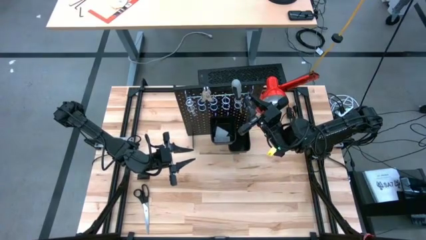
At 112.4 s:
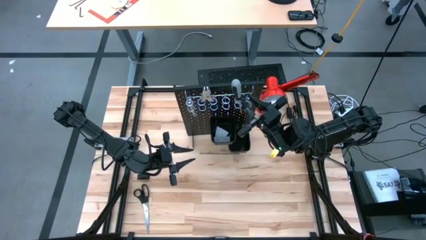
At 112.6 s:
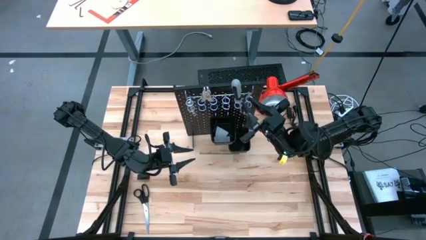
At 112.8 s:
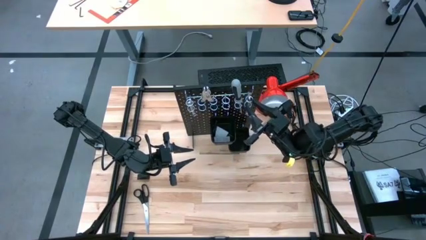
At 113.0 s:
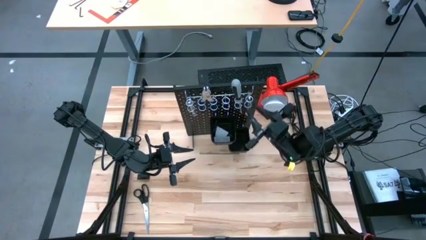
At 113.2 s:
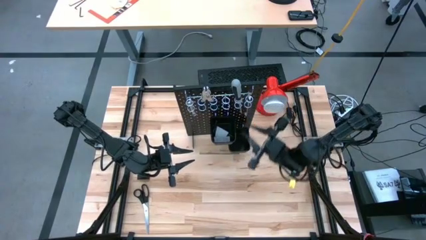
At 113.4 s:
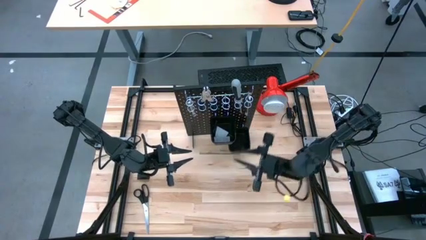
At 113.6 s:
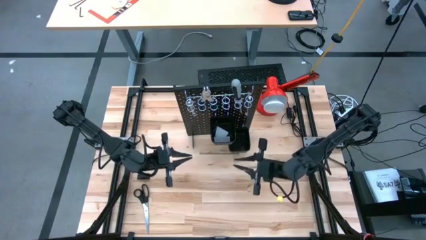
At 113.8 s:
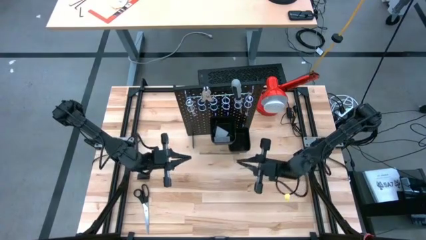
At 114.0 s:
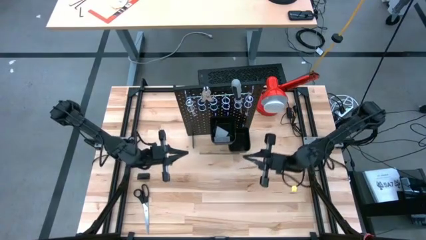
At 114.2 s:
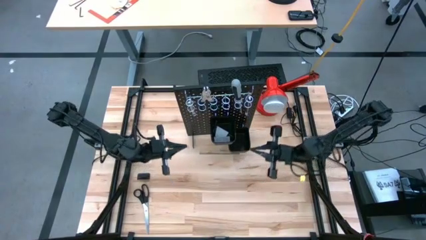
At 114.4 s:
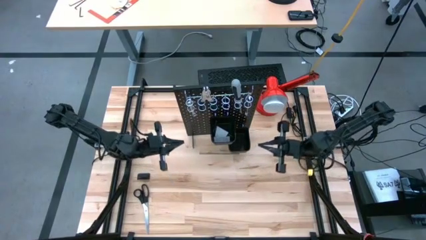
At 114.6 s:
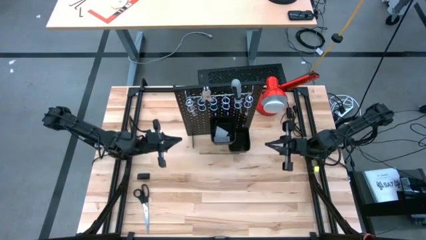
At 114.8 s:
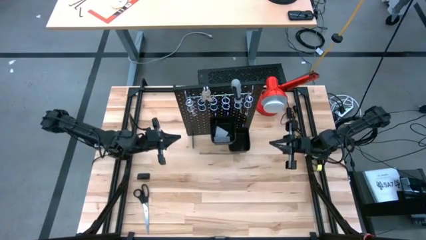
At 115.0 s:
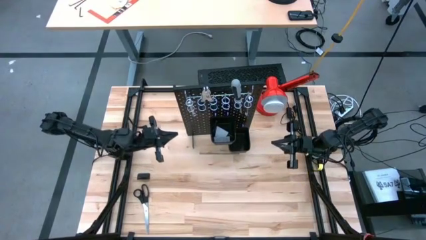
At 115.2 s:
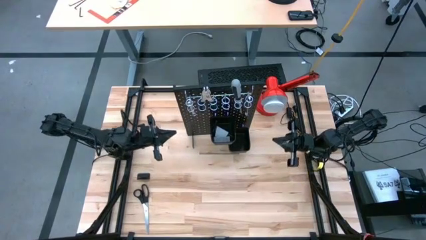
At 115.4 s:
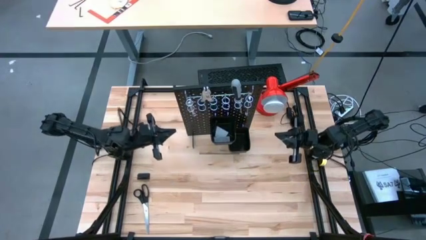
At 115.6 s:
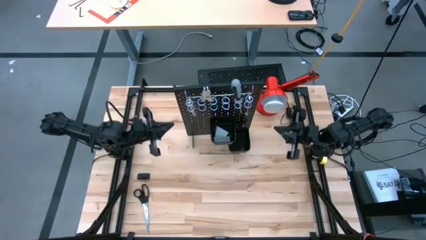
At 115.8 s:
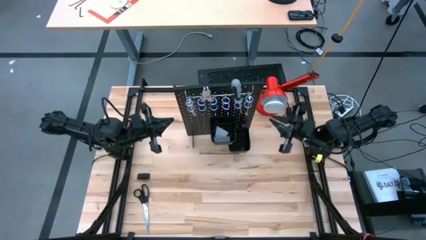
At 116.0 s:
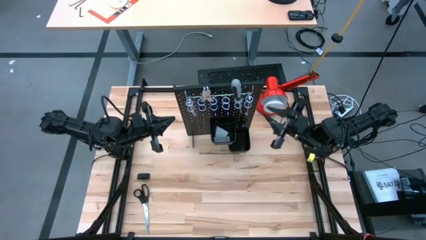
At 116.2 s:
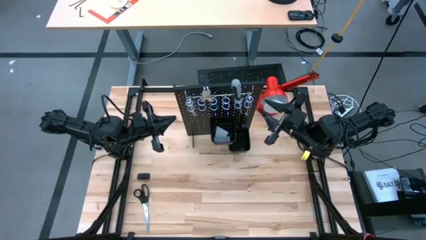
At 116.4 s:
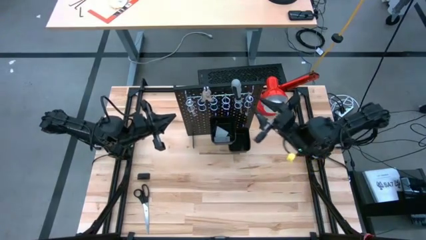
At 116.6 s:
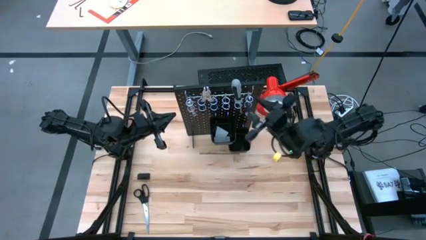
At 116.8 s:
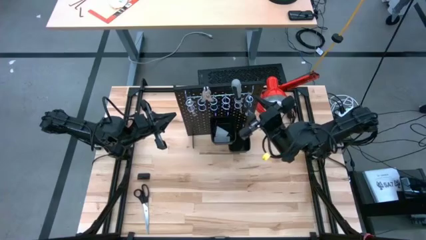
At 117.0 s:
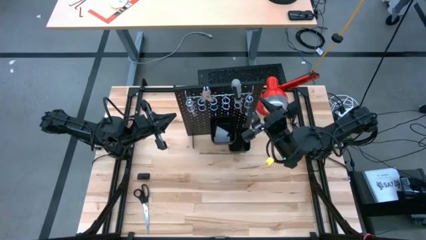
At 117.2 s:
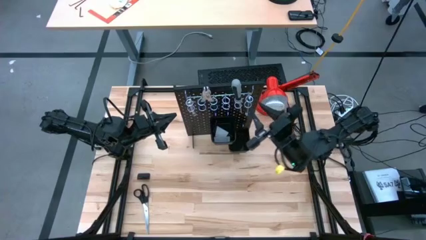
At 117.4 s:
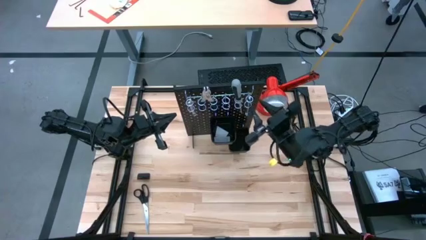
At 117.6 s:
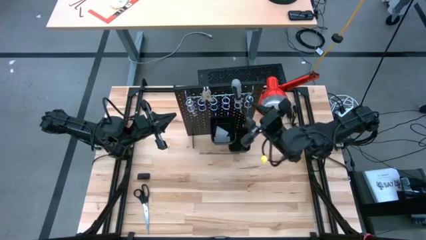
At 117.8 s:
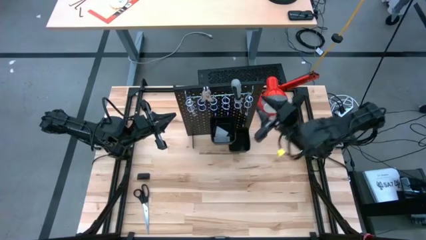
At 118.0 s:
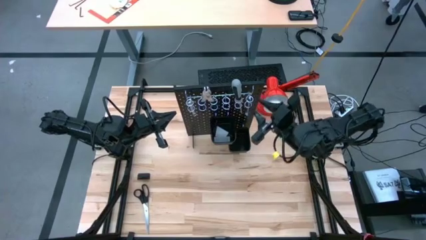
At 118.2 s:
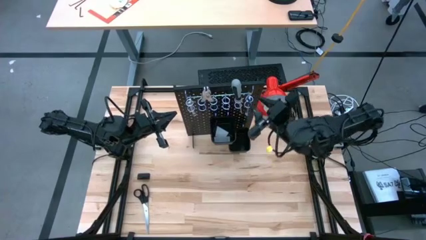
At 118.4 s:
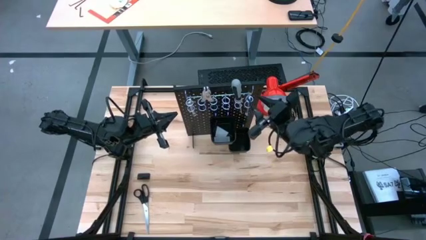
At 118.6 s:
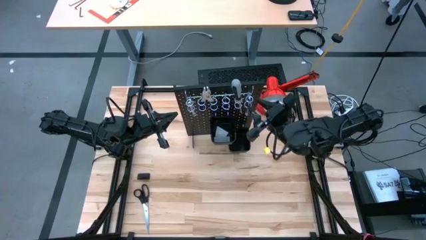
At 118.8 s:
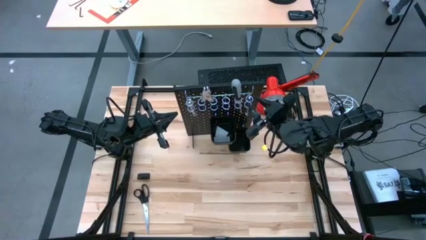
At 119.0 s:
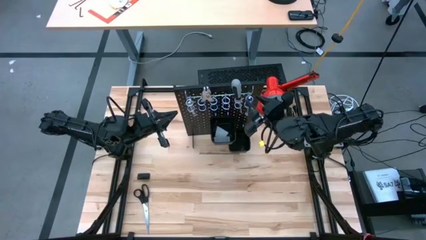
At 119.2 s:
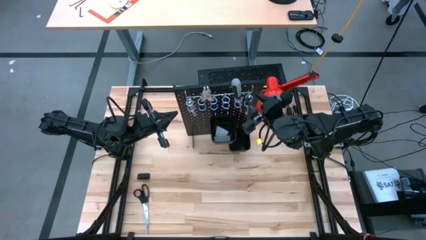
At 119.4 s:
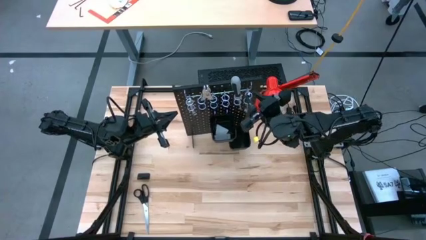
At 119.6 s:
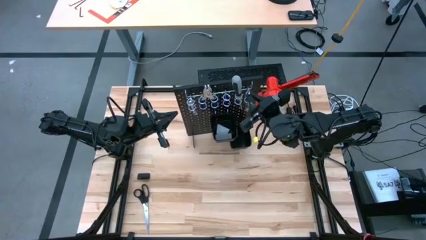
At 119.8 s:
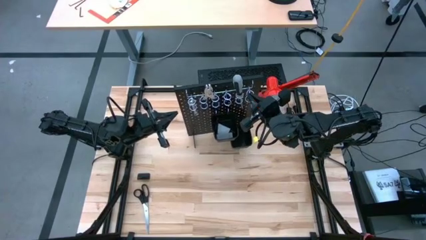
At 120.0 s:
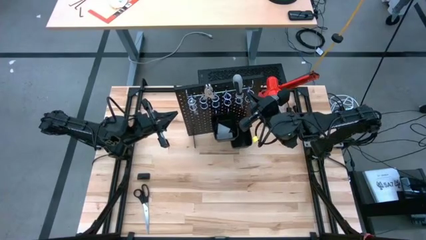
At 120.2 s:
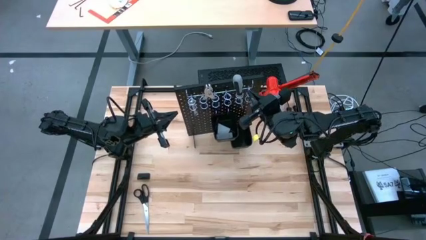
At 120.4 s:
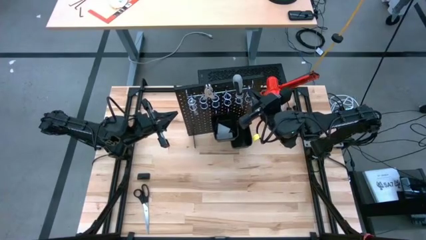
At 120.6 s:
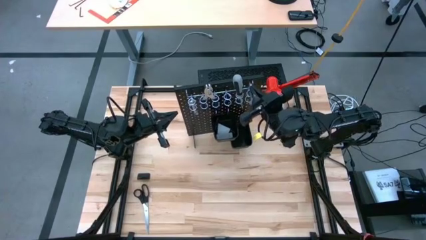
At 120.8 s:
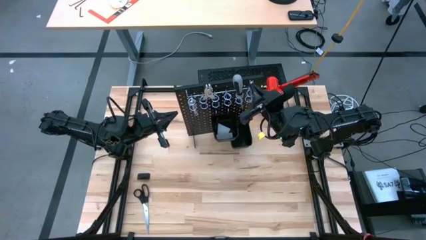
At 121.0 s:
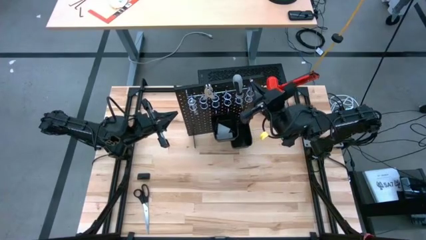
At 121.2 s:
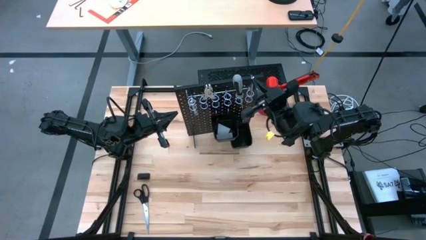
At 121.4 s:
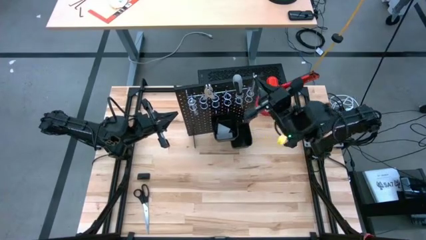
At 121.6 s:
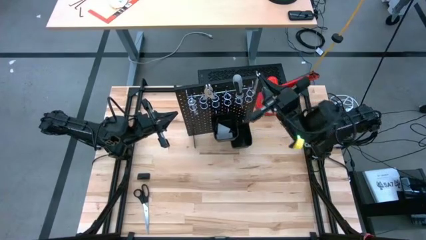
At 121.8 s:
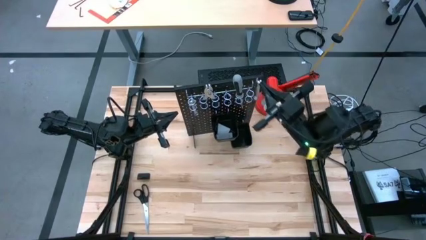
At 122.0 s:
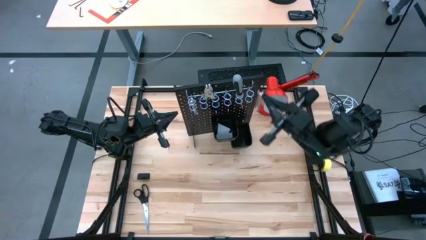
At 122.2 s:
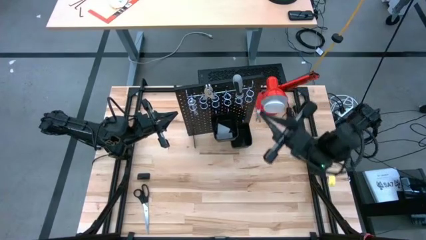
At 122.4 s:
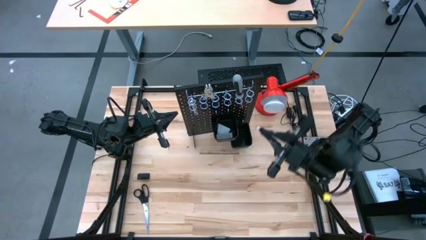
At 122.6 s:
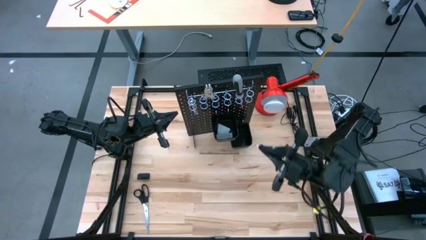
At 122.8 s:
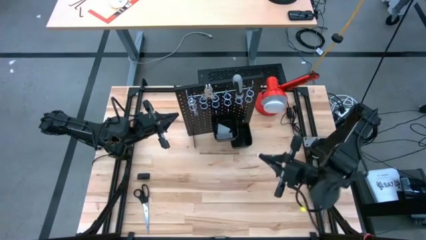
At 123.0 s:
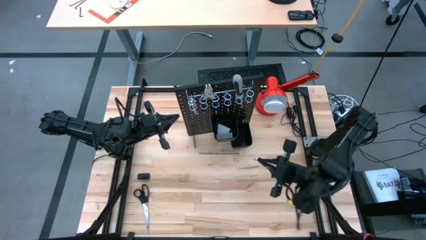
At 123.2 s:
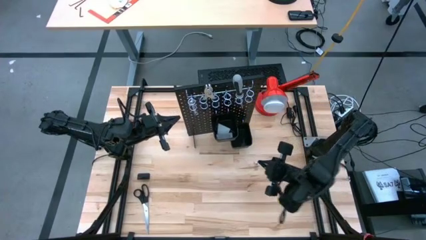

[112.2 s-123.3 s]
Task: Hang tools onto peg board
Unhang the wrench from the pegboard

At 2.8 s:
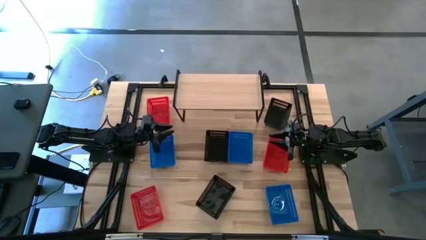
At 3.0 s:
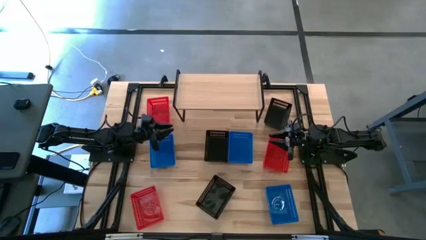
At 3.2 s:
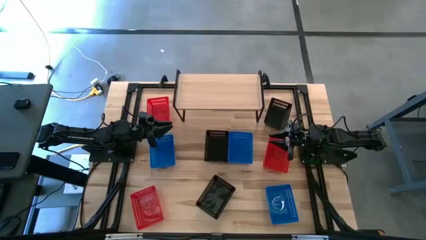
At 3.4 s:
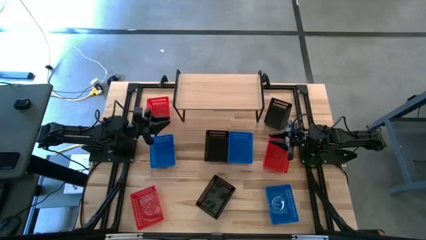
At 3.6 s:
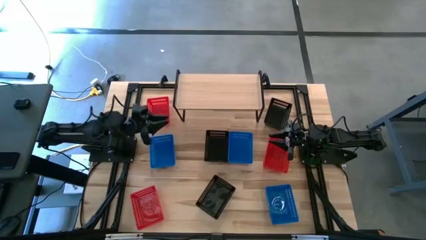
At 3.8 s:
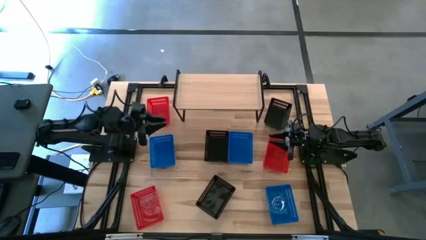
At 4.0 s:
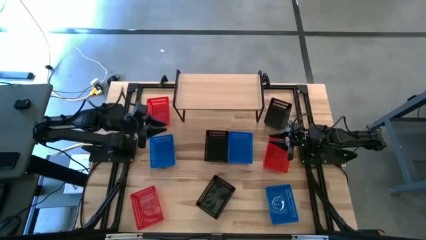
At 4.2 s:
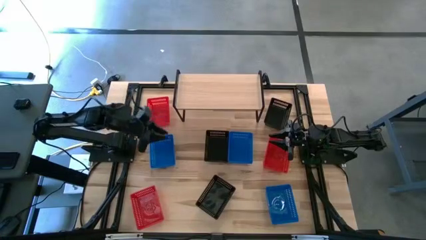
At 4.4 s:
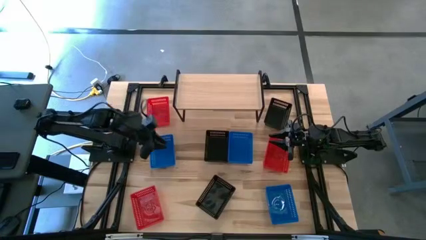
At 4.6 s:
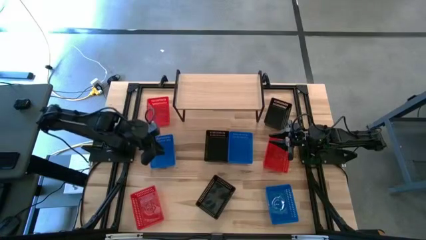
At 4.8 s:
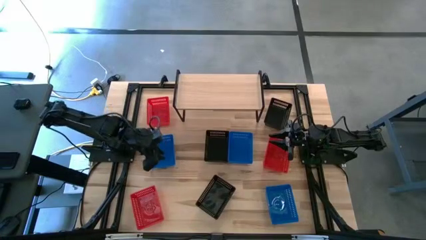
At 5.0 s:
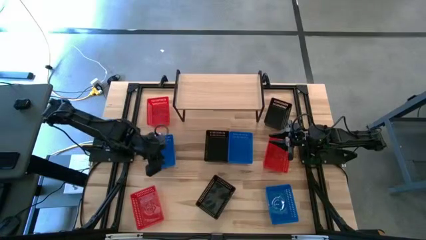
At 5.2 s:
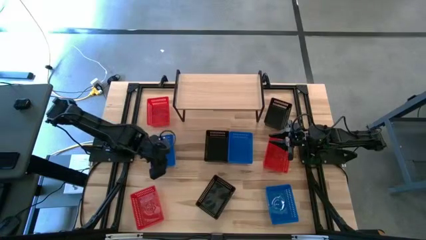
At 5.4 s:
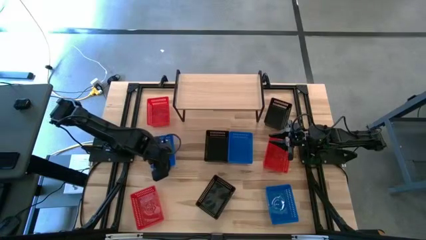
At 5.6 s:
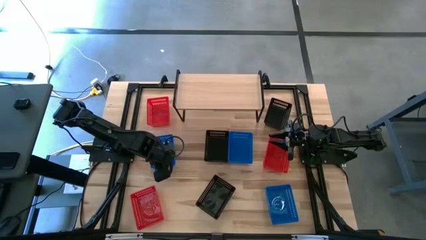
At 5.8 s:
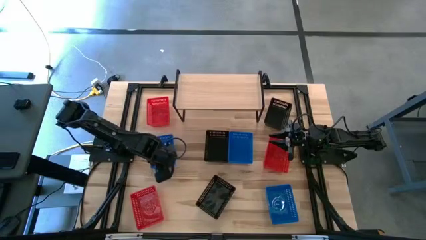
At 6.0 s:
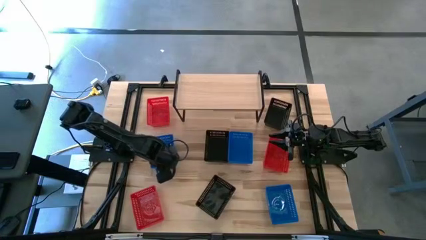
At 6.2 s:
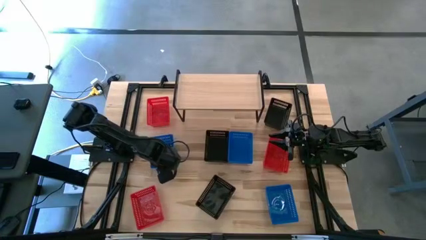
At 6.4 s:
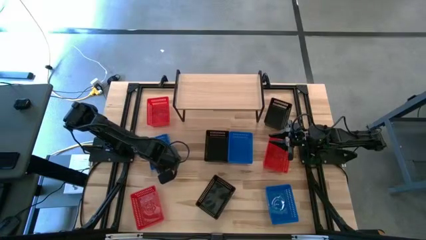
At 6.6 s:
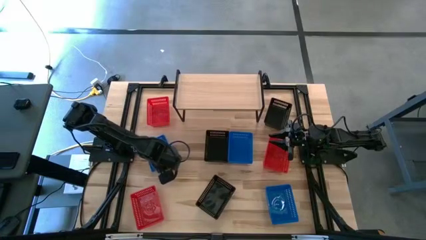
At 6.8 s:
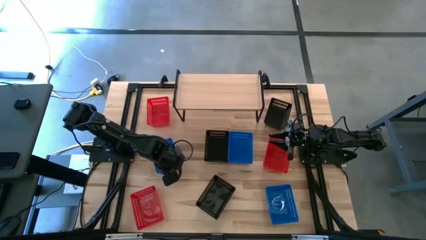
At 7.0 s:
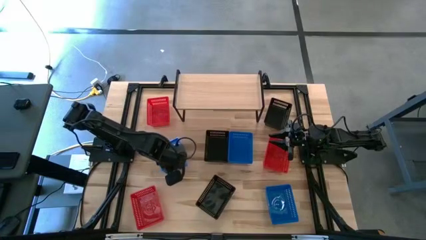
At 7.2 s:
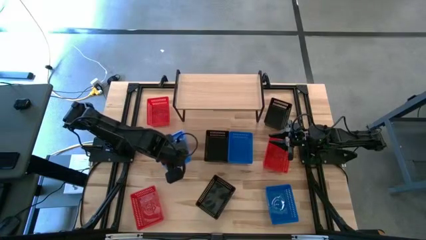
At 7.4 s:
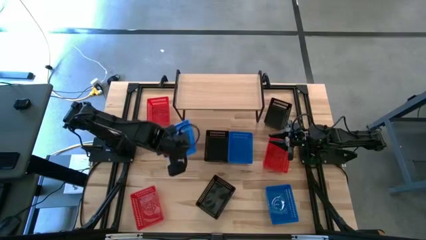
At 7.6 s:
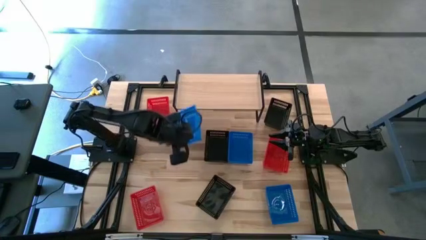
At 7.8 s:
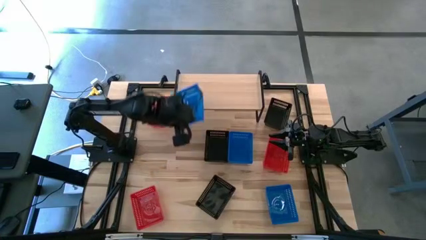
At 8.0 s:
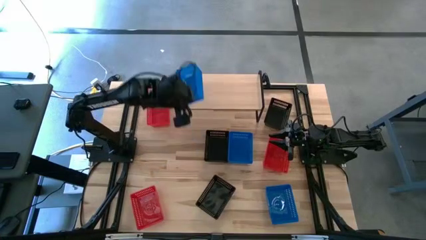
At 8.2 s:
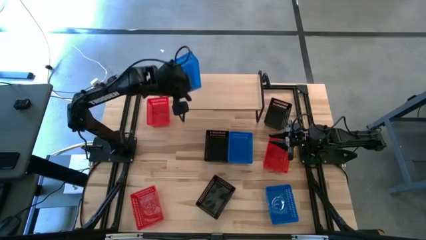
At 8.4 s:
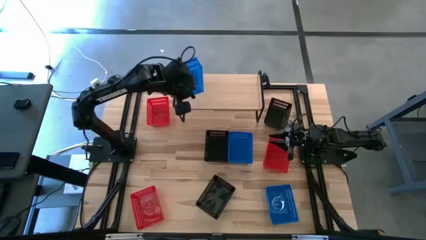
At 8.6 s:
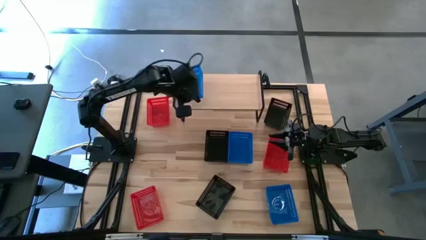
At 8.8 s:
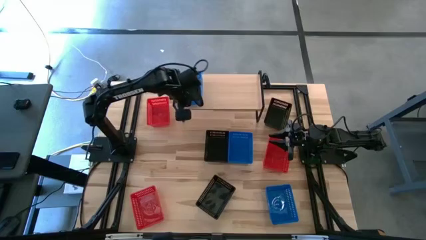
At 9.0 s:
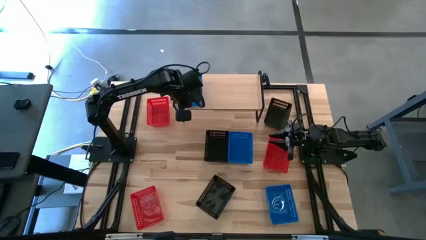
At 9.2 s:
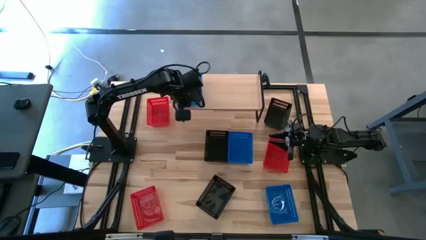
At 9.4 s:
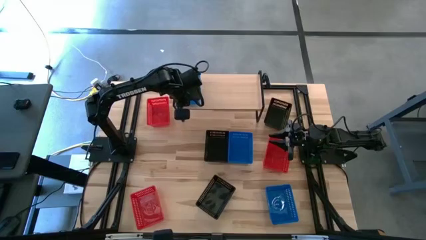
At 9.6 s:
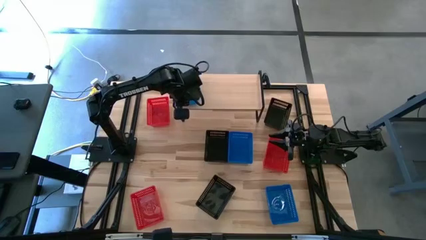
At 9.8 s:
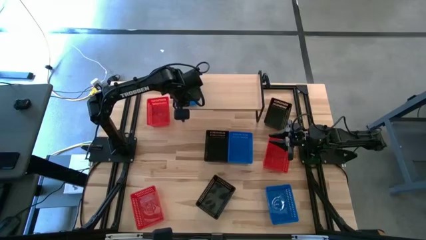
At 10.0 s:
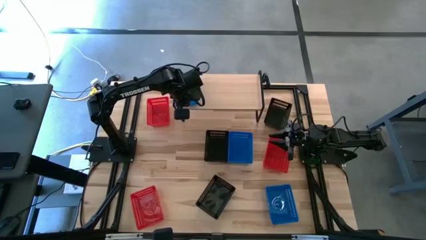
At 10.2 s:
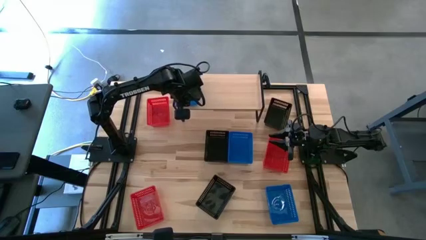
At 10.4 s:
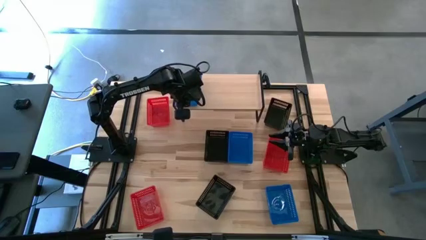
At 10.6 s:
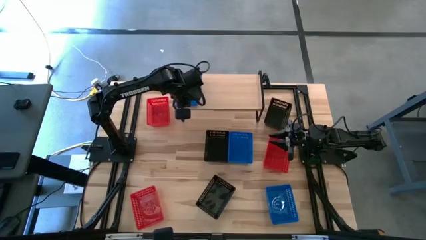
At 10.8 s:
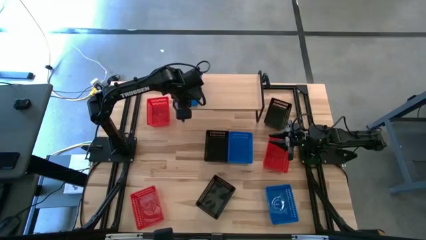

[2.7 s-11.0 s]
Task: Stack baskets on shelf by color
Put the top left blue bin on the shelf
